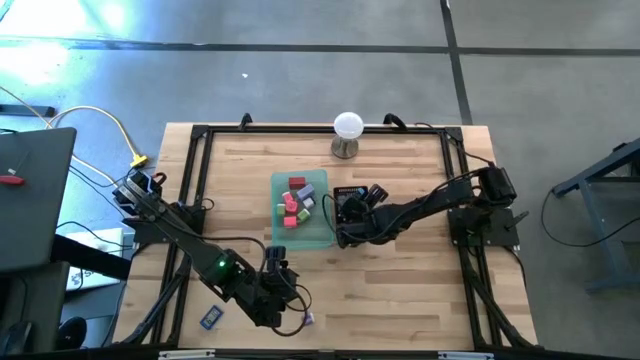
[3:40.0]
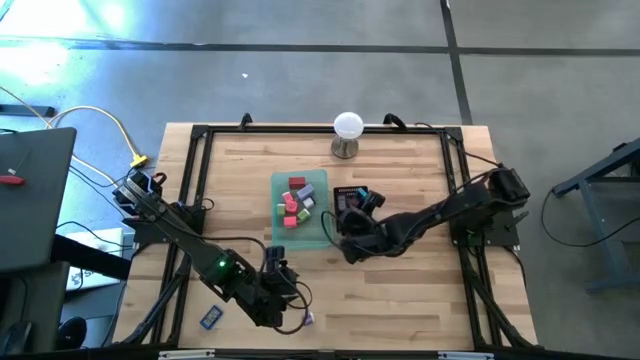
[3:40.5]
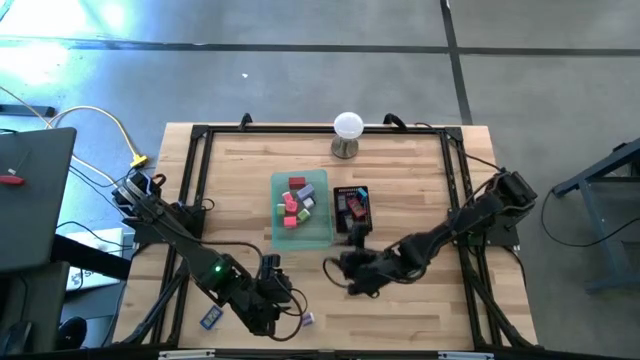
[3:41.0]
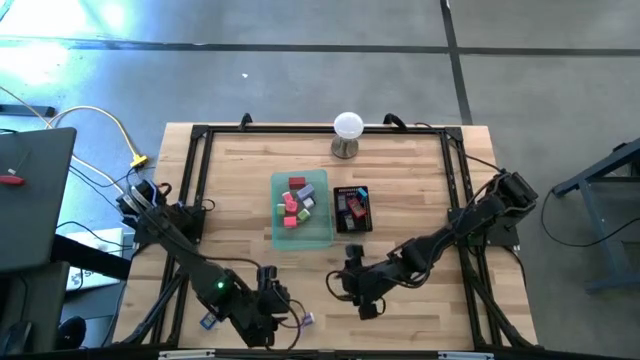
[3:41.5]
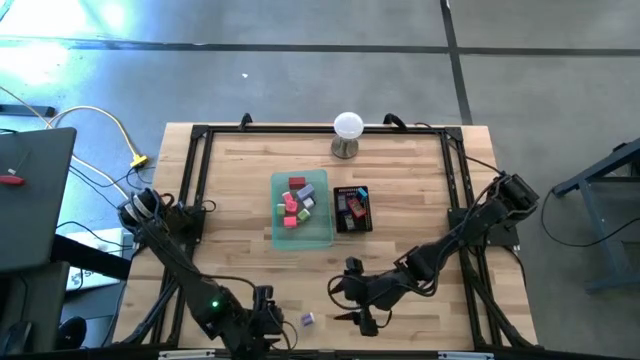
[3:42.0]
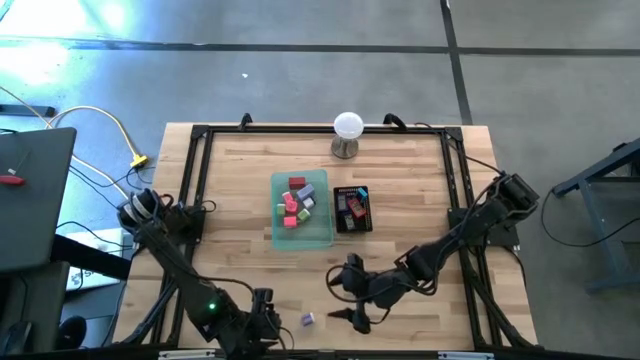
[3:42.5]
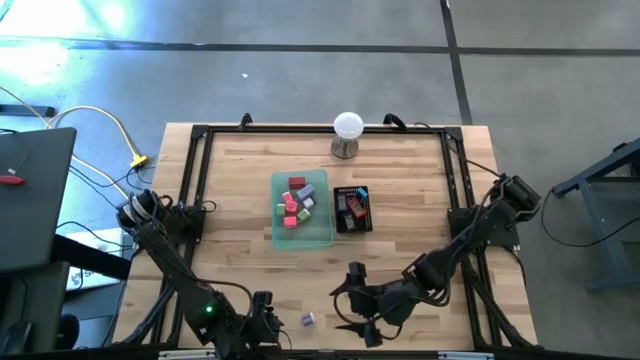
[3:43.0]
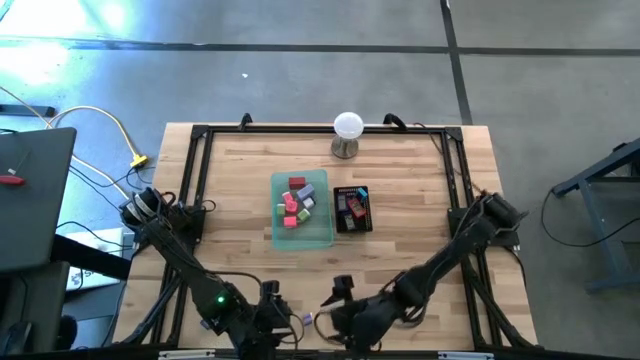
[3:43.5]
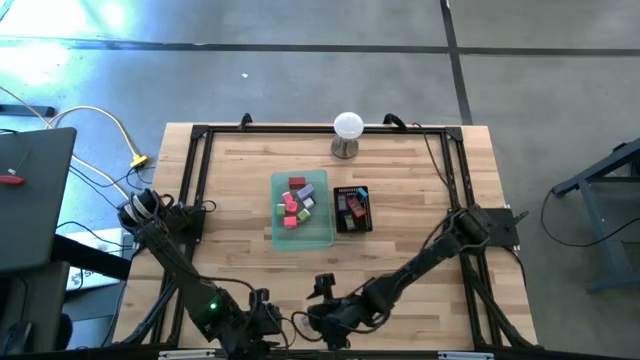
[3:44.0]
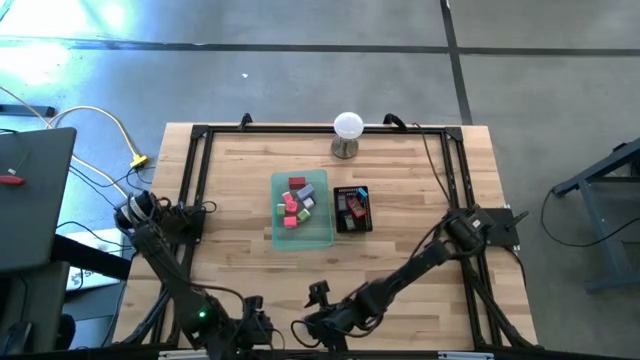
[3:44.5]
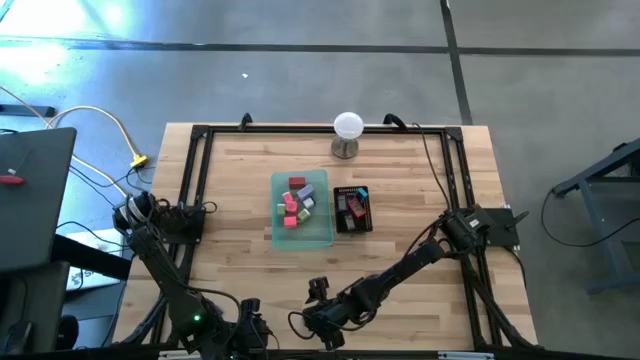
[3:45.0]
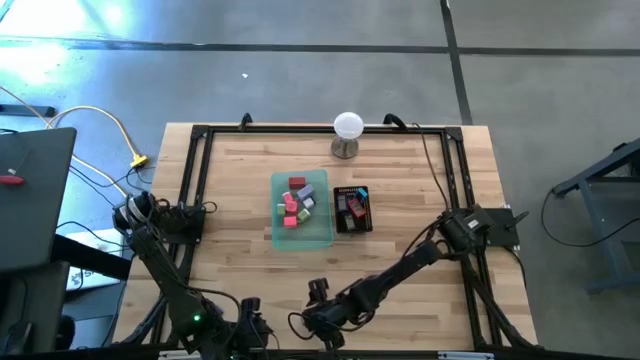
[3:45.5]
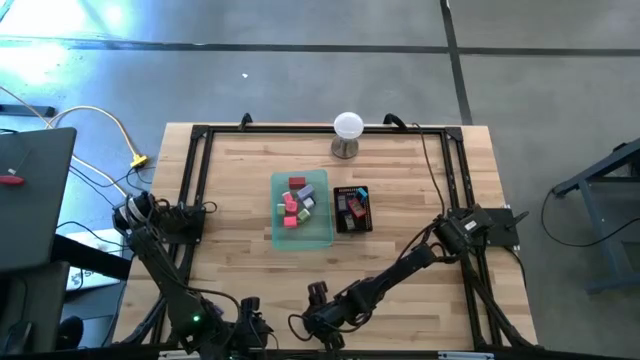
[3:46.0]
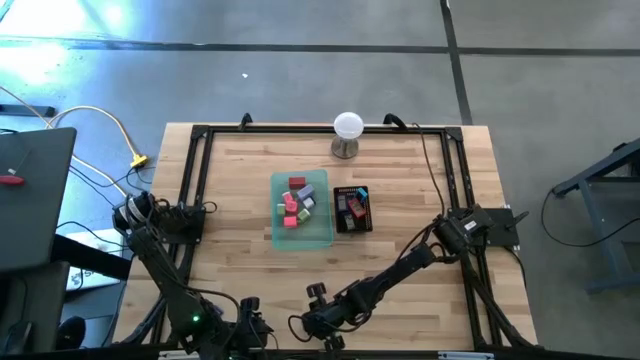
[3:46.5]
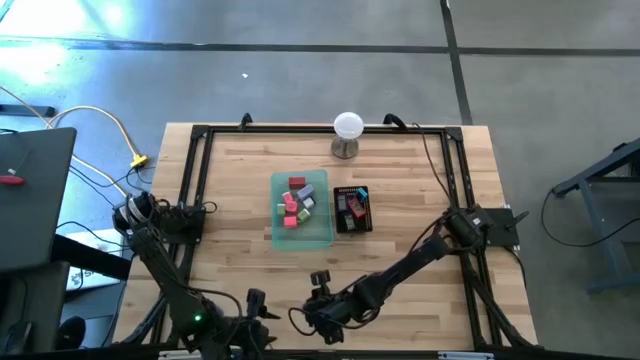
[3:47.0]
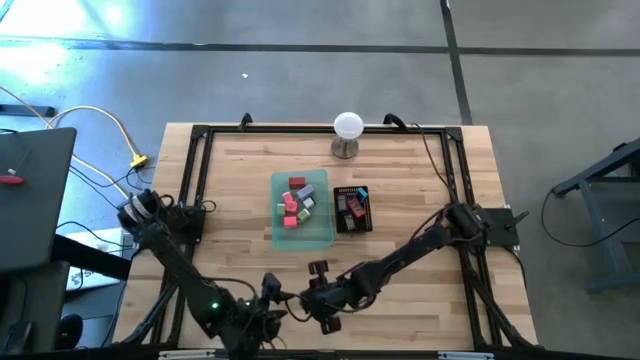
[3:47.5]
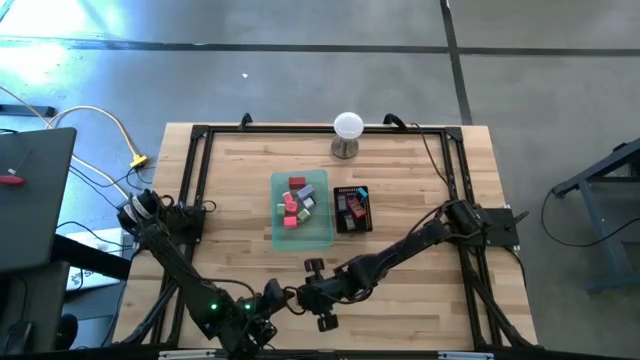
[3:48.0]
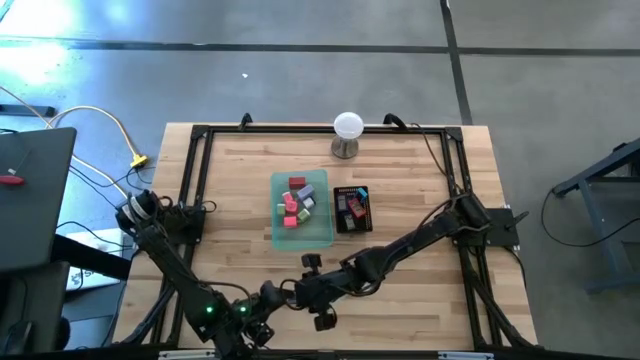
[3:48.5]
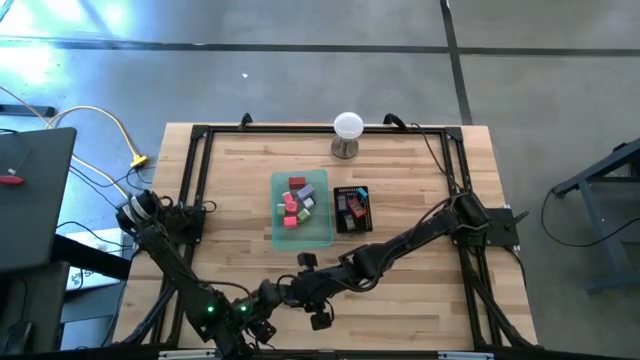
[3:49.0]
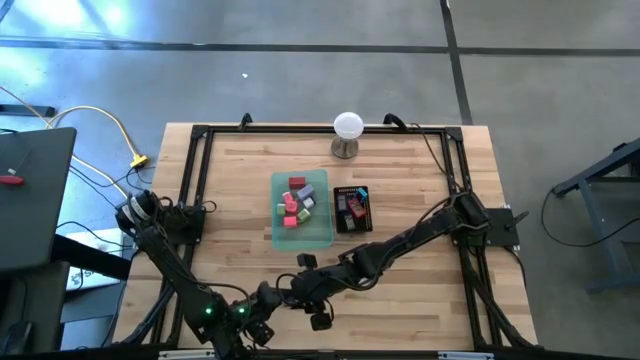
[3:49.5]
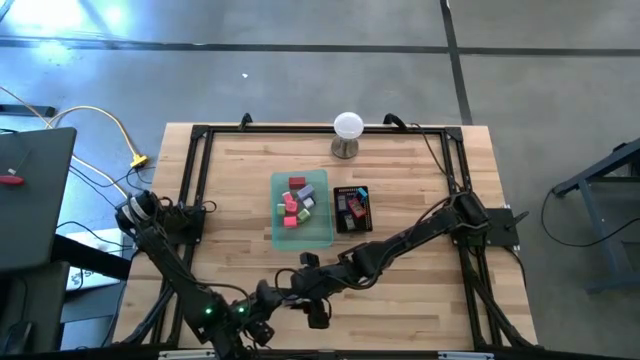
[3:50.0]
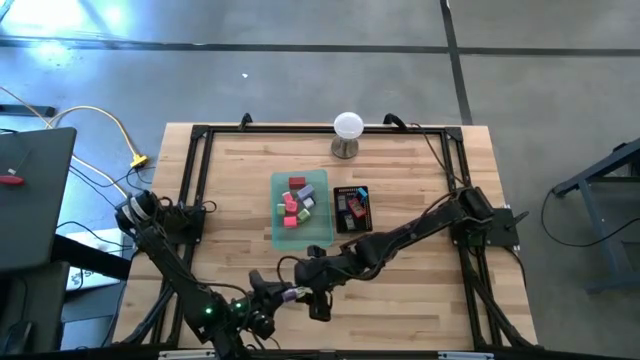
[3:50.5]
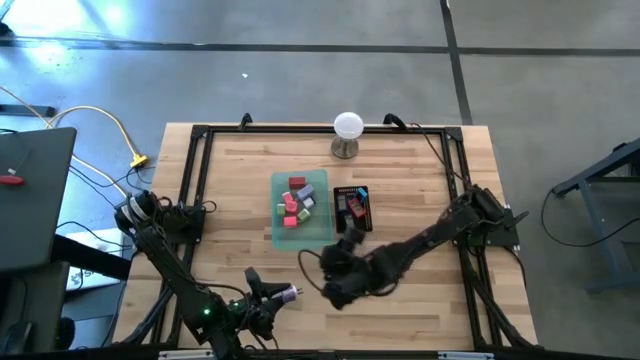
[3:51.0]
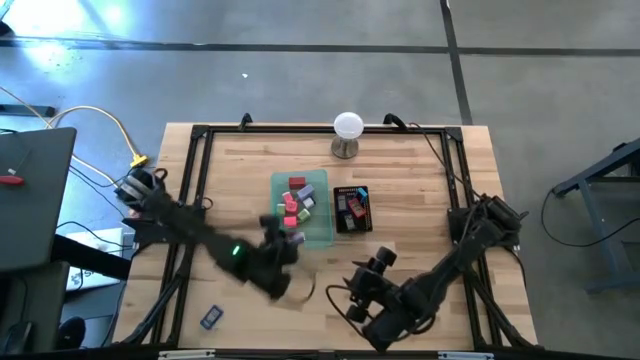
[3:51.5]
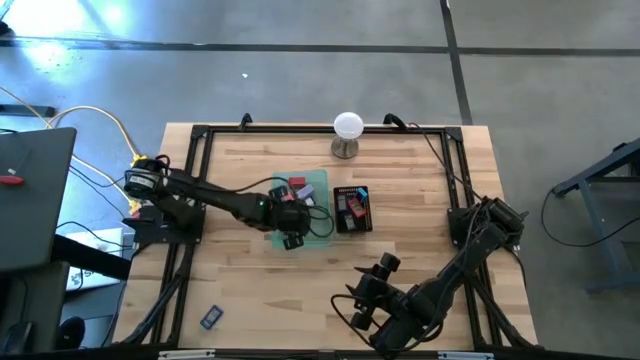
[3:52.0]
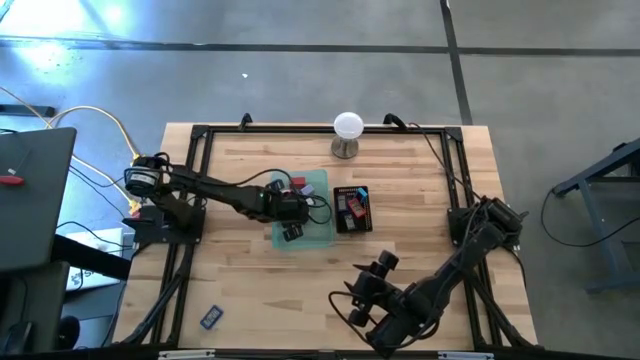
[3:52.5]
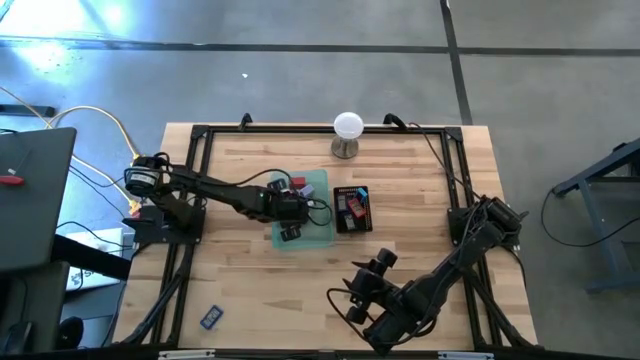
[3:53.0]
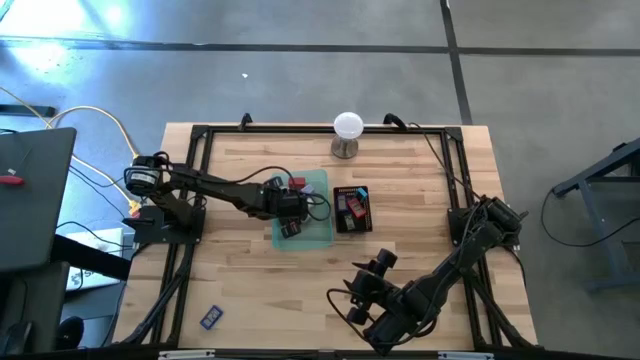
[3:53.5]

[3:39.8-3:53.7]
Task: Pick & Place Office items
Put the violet charger adapter into the blue bin

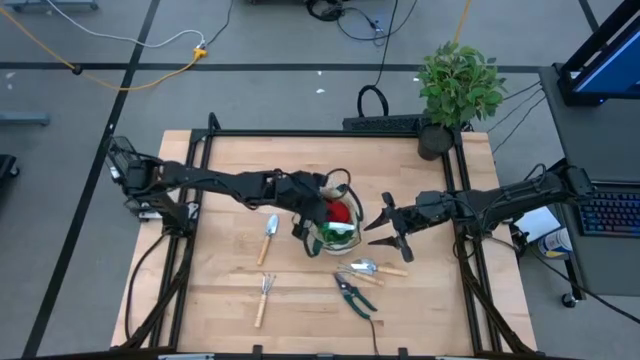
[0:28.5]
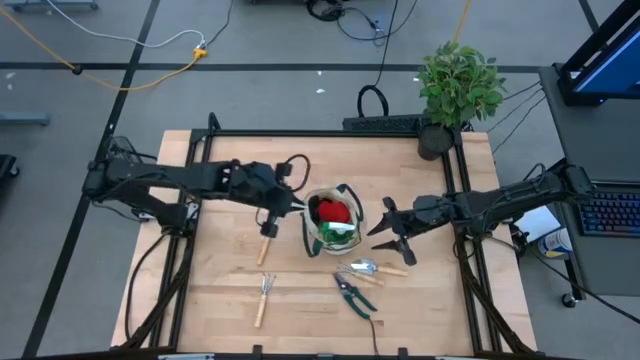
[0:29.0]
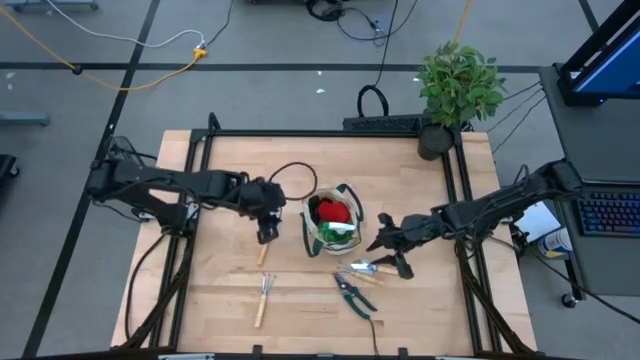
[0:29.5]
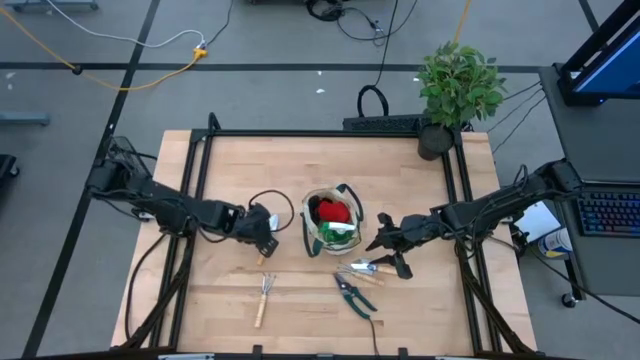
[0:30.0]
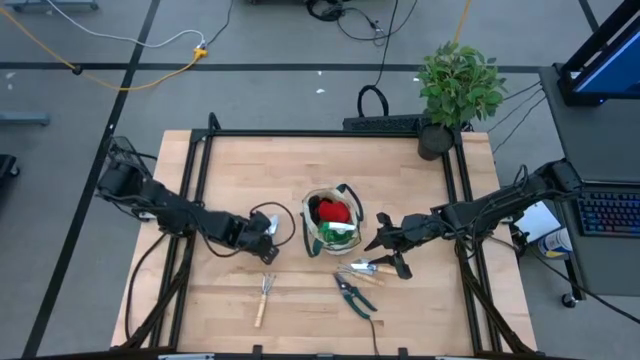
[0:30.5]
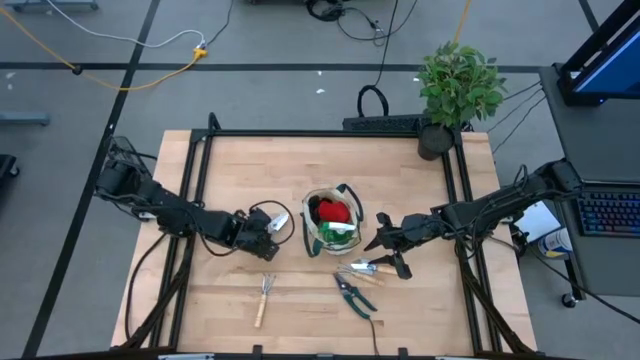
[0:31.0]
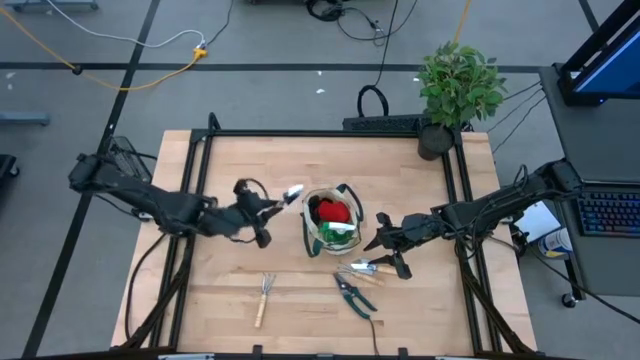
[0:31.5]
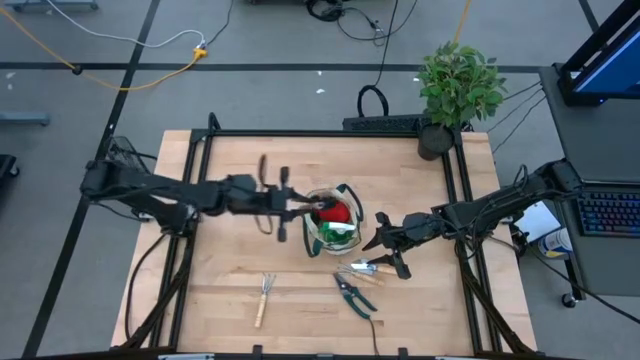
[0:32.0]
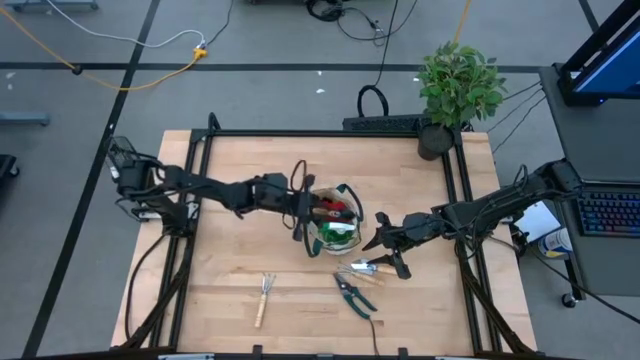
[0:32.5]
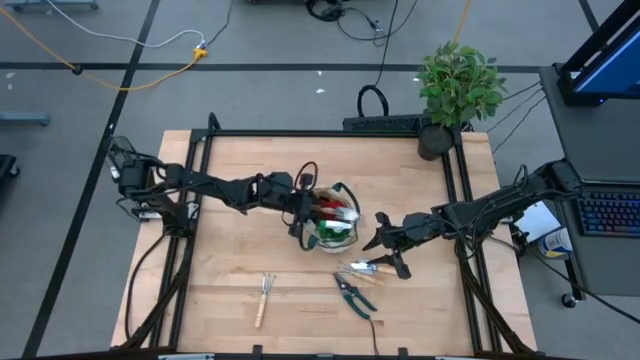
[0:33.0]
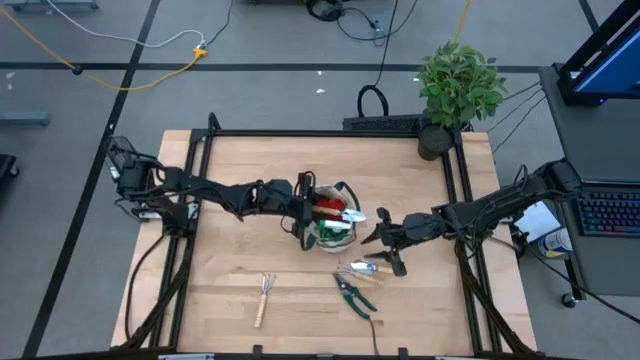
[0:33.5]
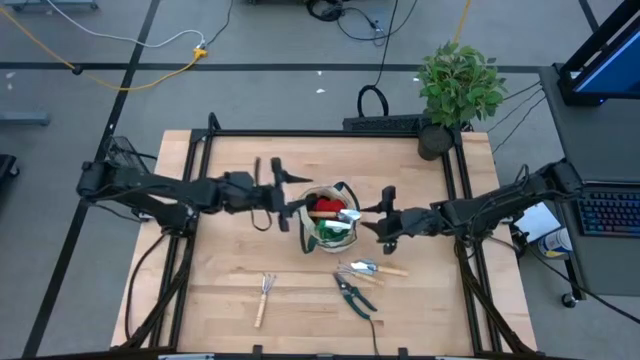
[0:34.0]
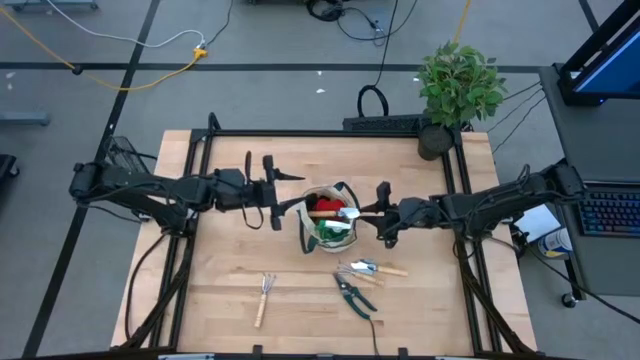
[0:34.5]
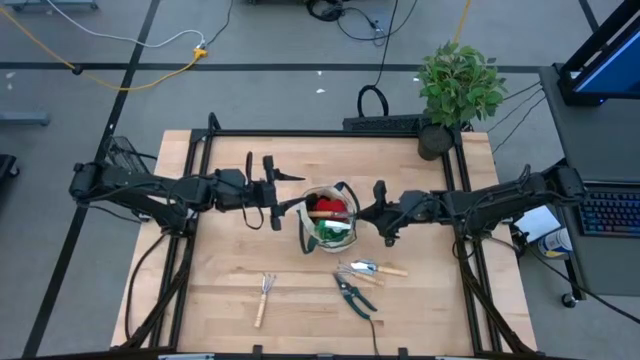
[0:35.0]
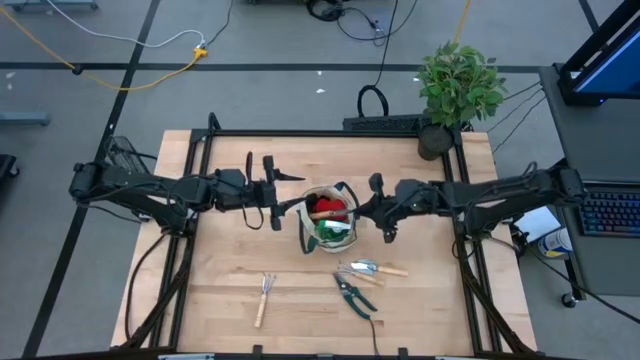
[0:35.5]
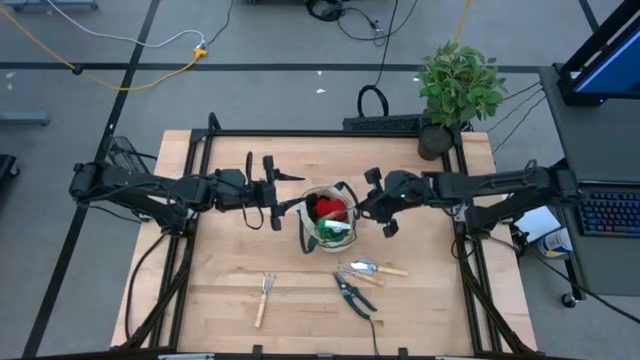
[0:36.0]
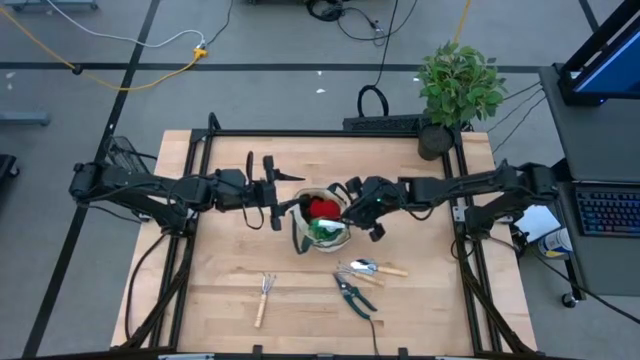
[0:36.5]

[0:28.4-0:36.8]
Task: Pick & Place Garden tools in Gardening bag
Put the left brown trowel into the white gardening bag
